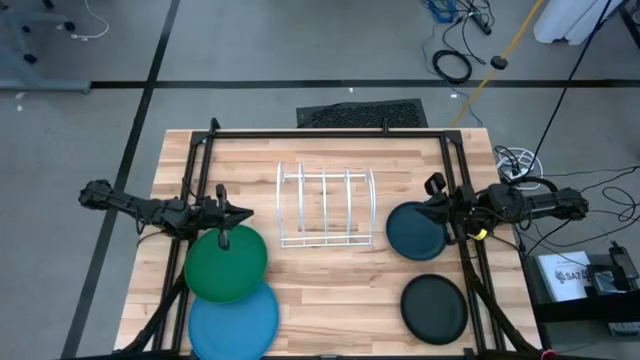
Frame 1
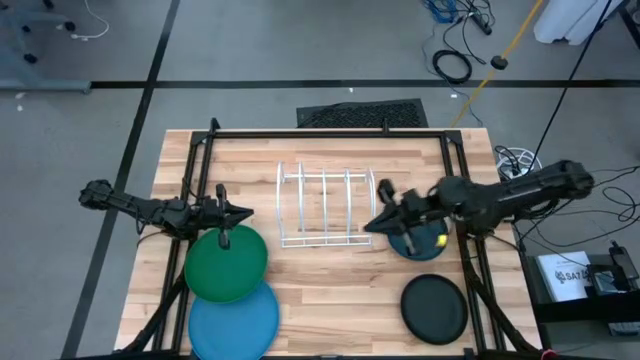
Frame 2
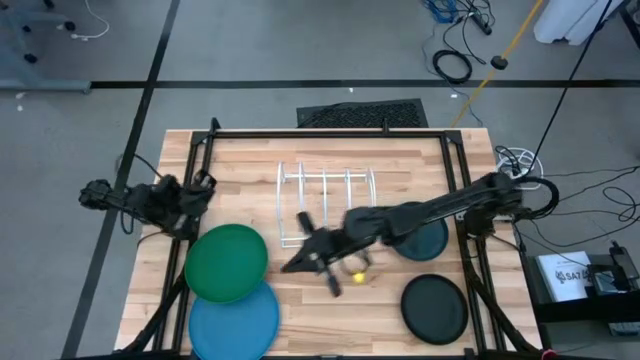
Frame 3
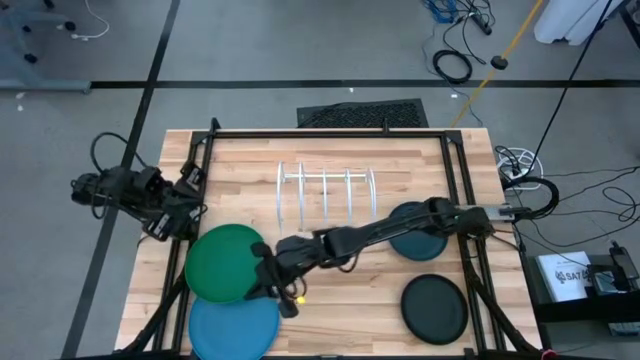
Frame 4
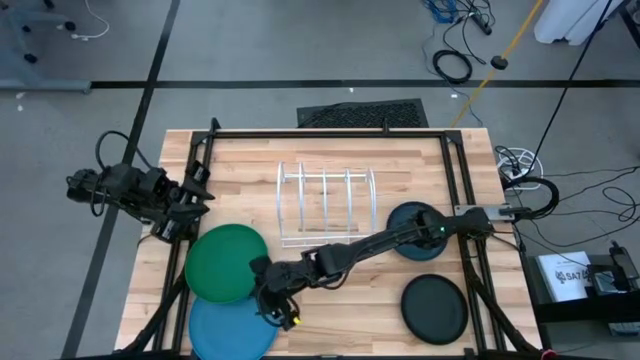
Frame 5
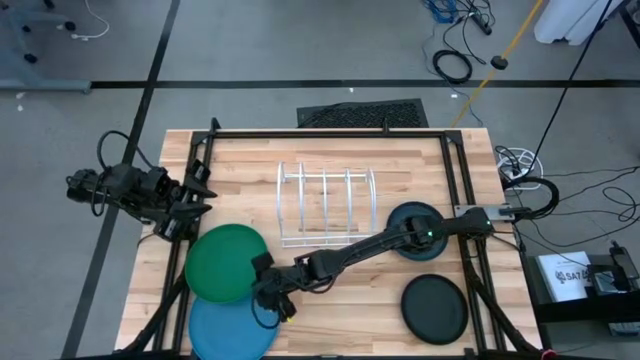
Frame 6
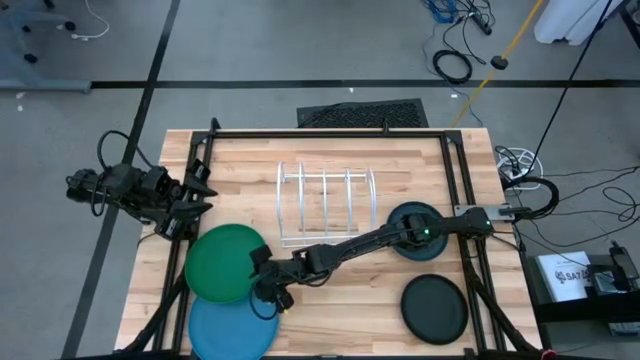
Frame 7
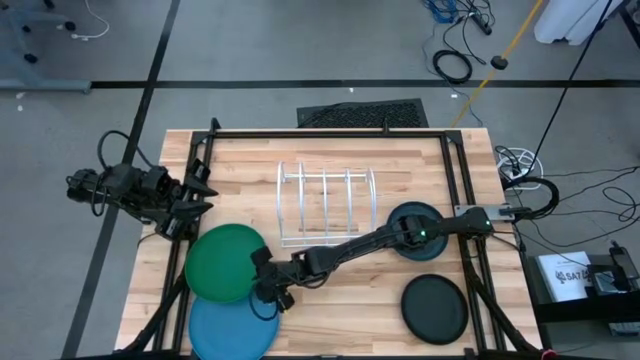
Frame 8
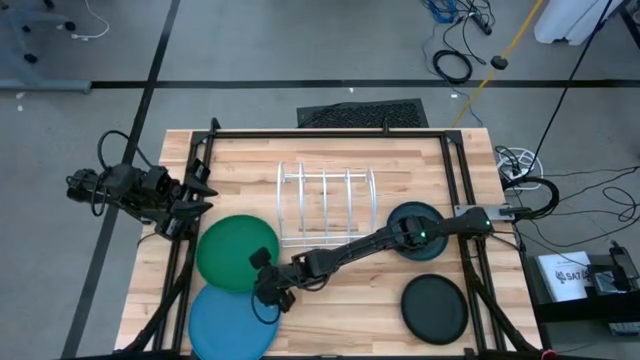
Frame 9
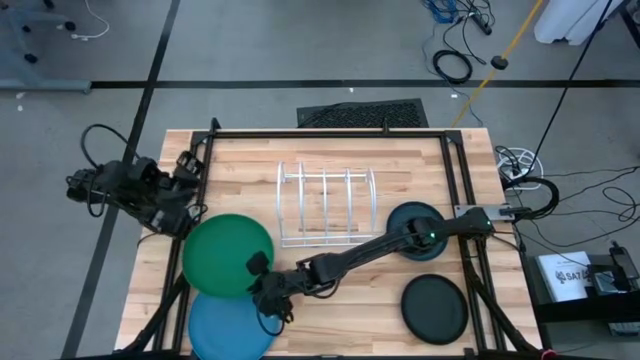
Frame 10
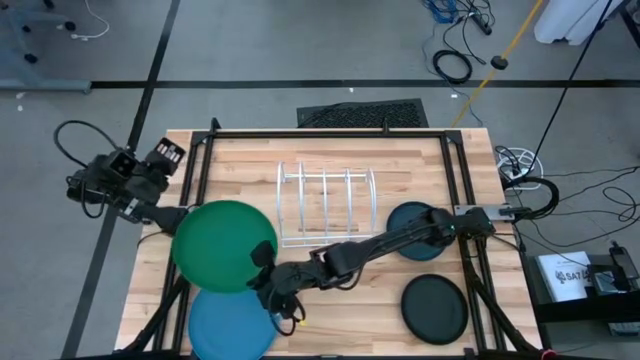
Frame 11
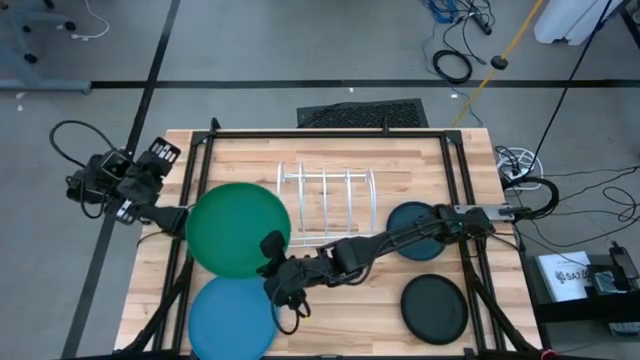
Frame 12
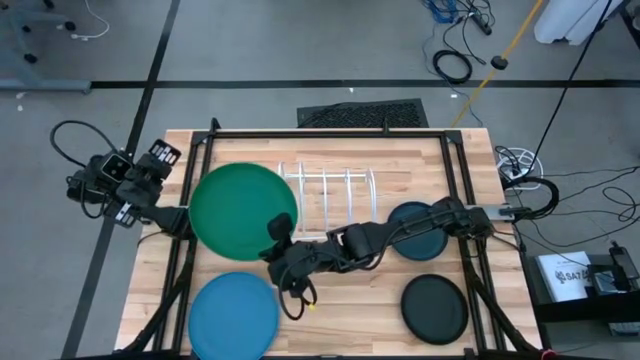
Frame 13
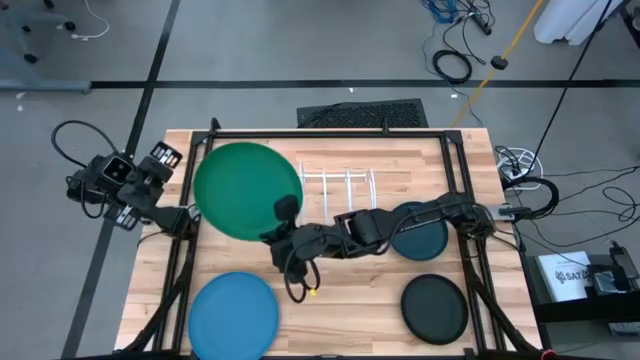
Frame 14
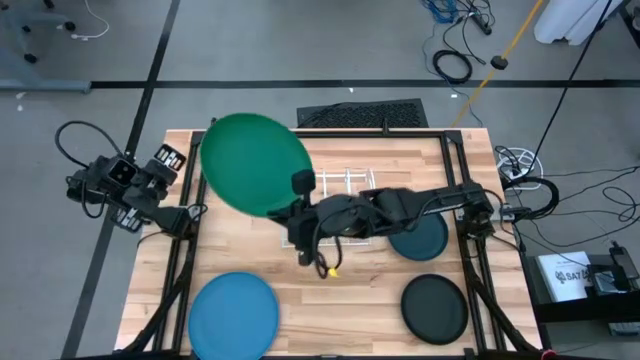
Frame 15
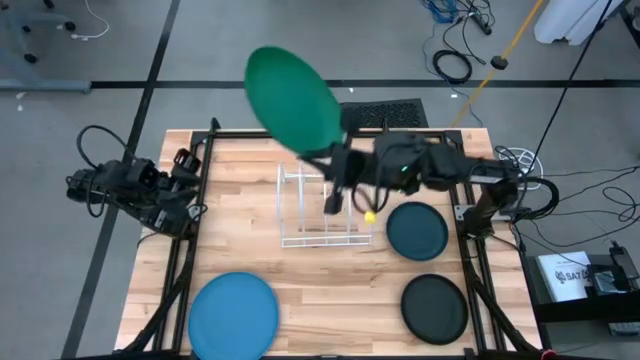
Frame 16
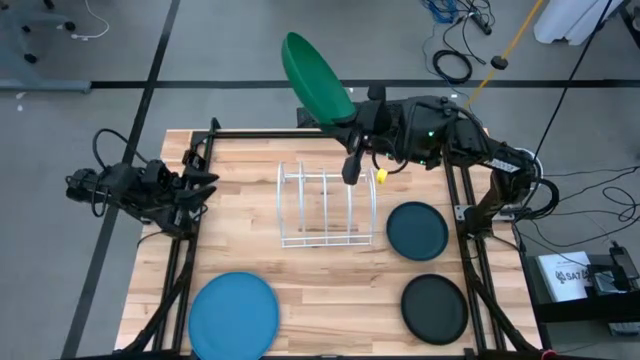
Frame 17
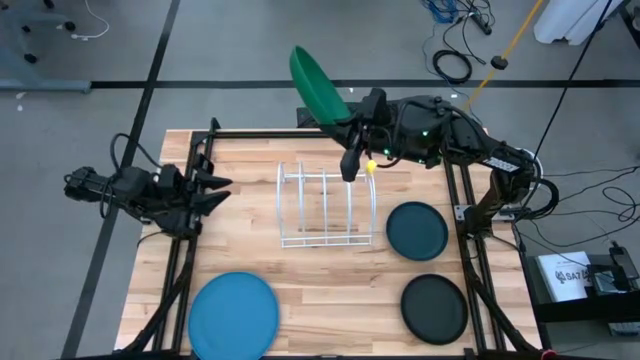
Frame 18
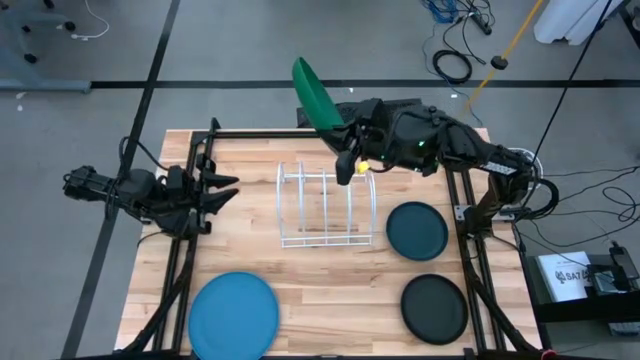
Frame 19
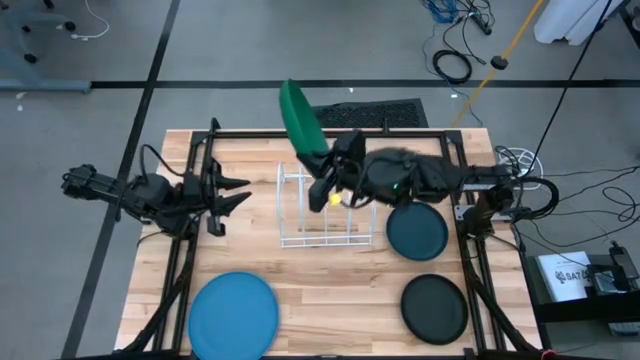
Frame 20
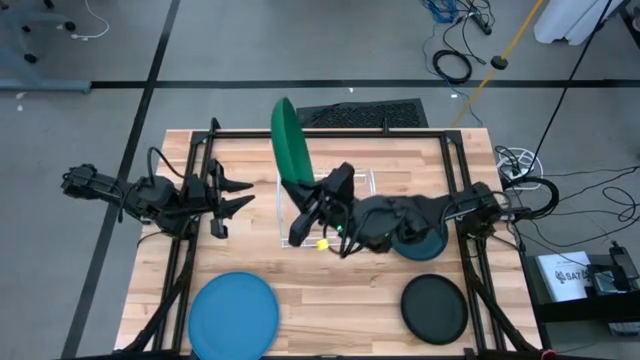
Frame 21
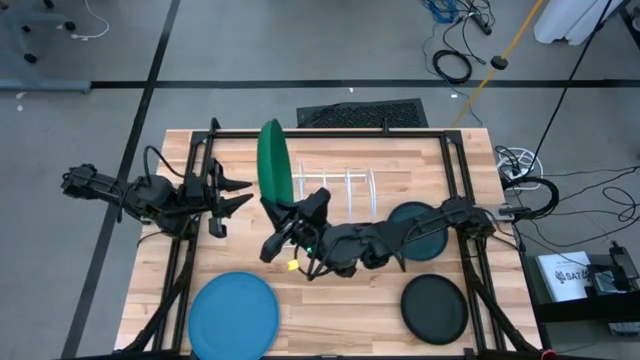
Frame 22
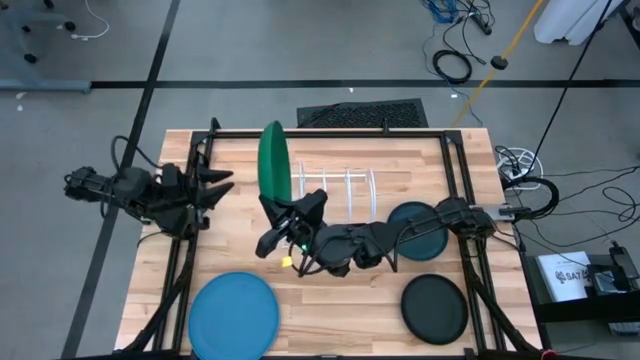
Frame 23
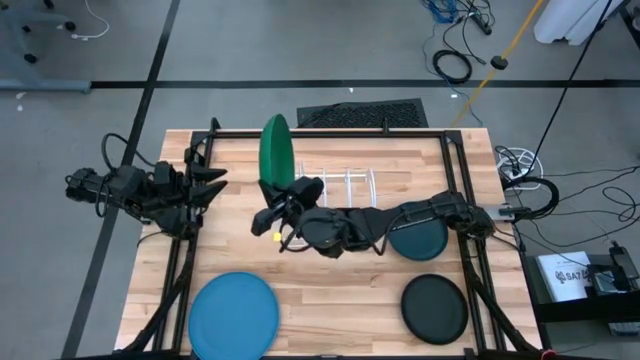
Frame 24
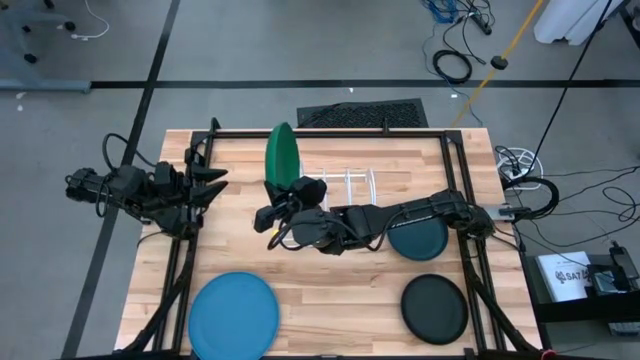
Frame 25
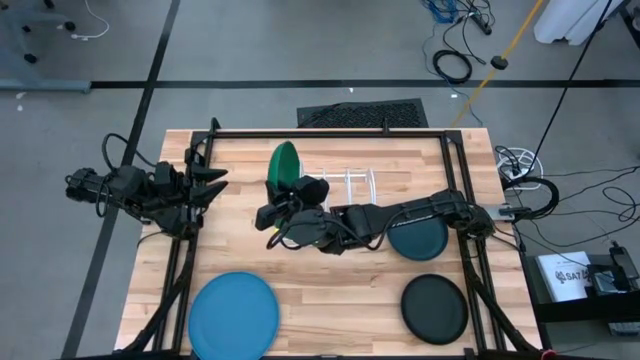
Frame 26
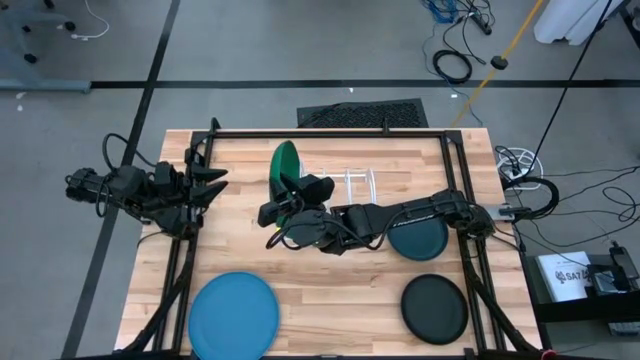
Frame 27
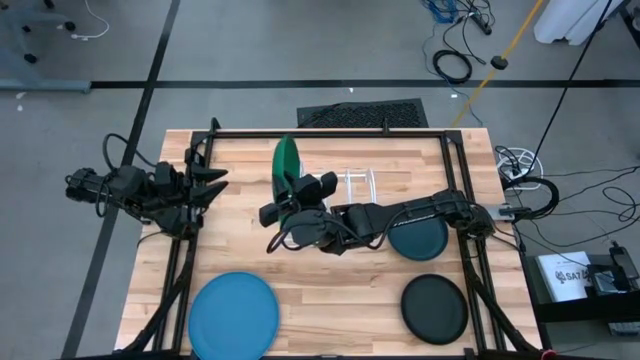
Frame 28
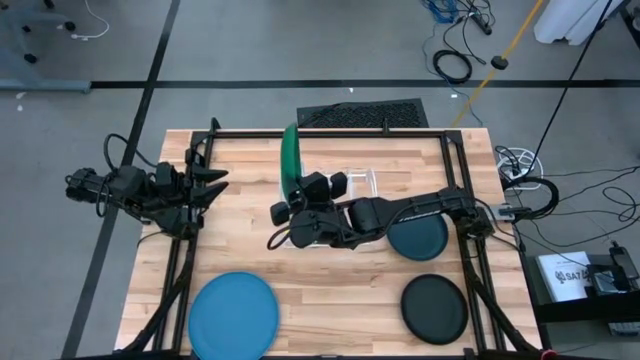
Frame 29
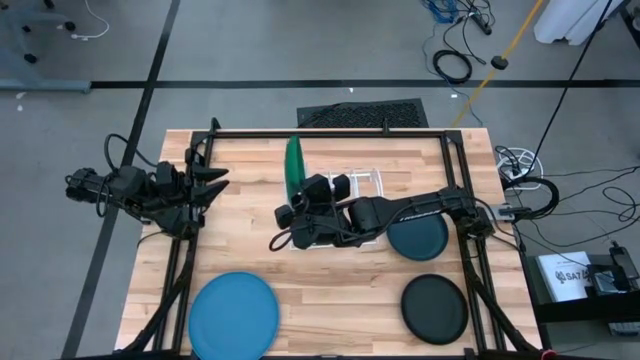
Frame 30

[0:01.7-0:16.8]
Task: Sort dishes
Put the green plate into the white dish rack

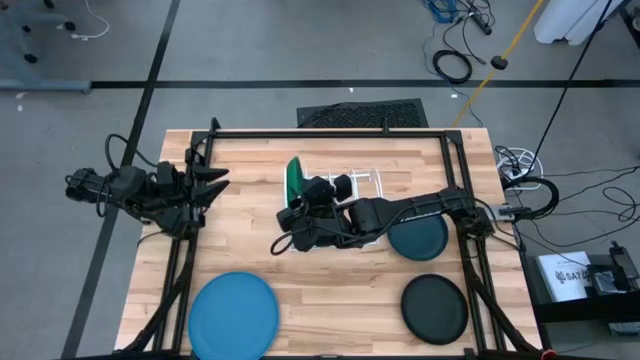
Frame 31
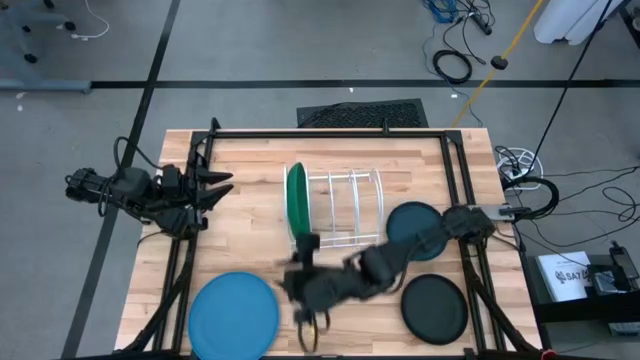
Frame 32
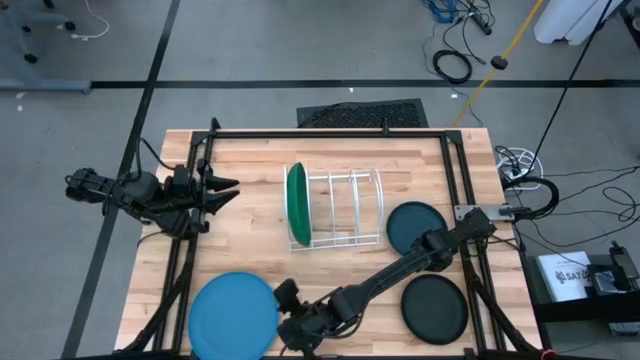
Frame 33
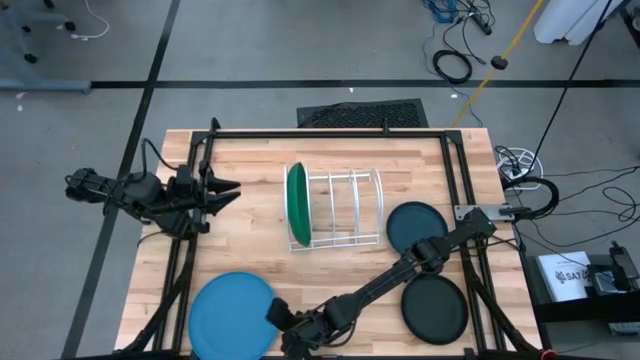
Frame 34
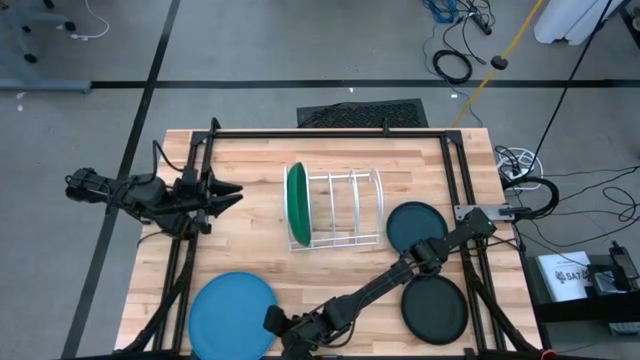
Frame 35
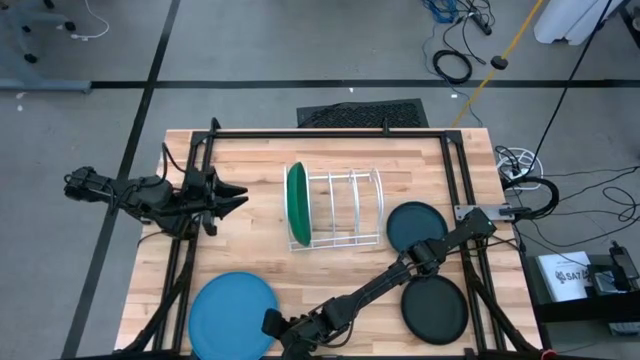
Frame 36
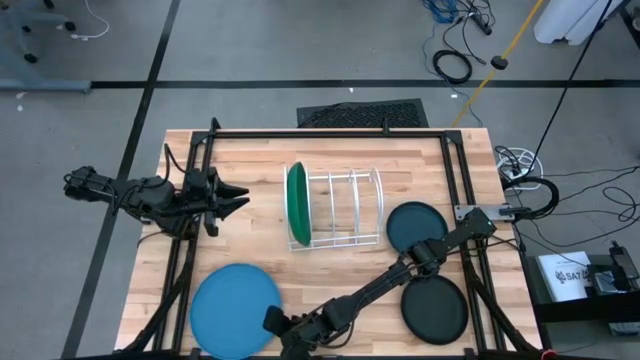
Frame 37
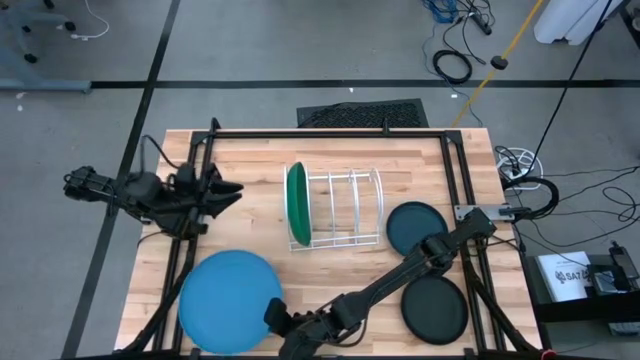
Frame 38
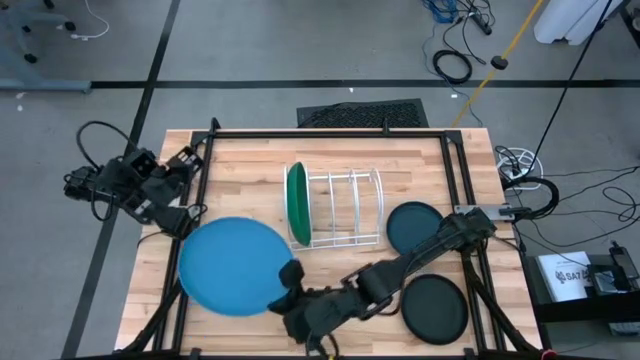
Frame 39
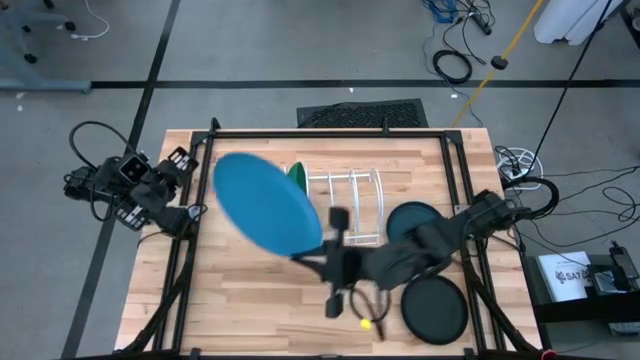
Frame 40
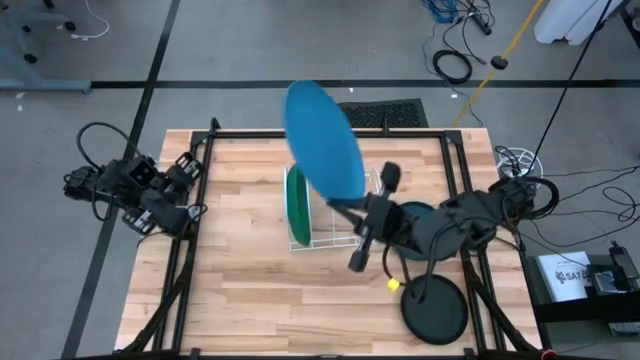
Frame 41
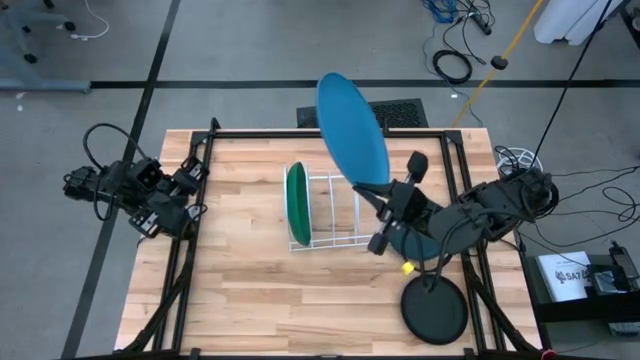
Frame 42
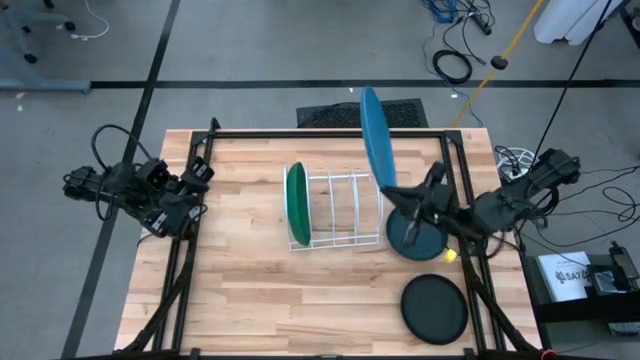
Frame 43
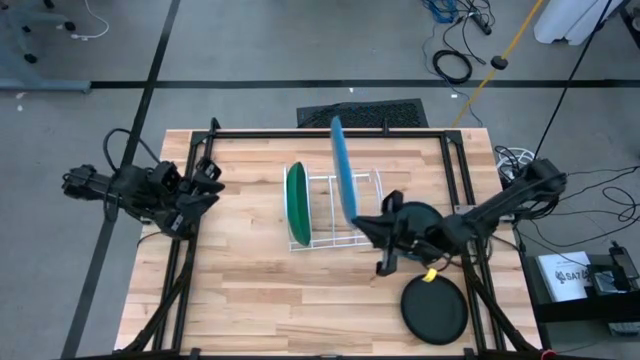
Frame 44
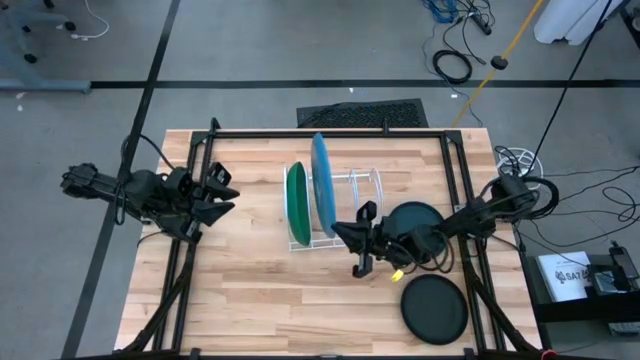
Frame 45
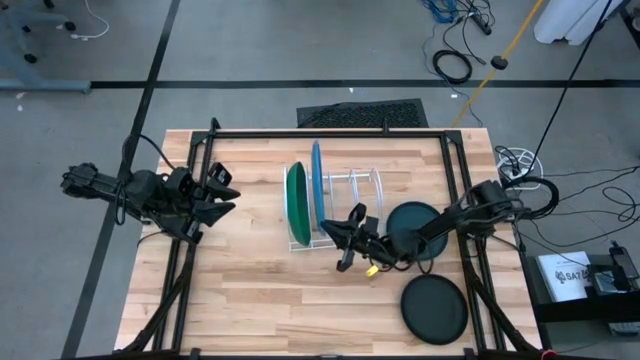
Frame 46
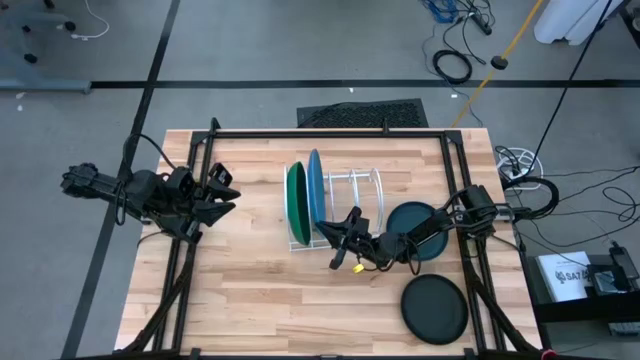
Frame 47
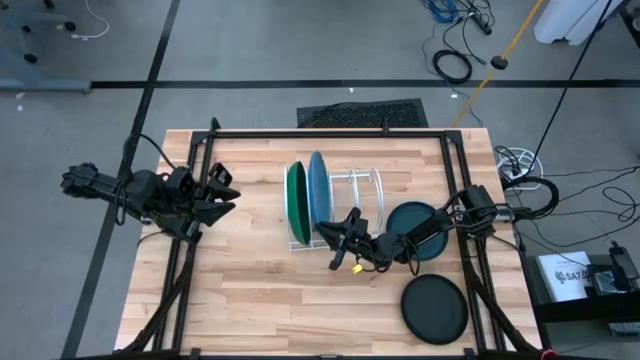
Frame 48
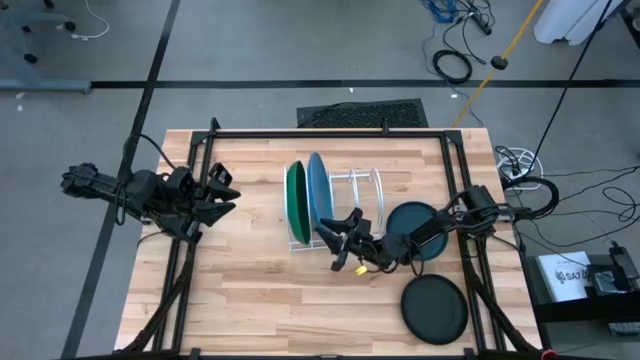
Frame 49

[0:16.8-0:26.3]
Put the light blue plate into the white dish rack
